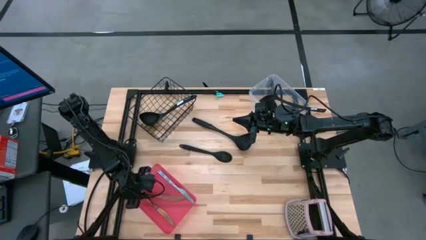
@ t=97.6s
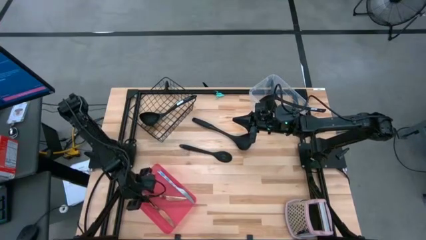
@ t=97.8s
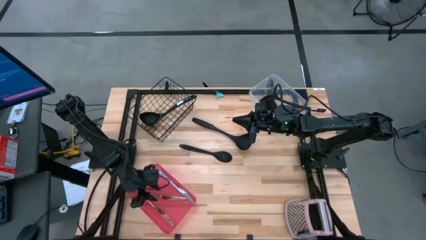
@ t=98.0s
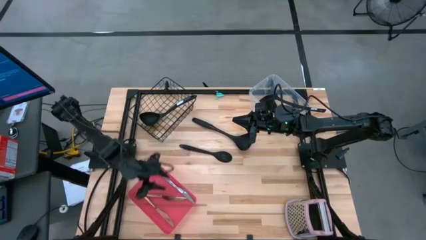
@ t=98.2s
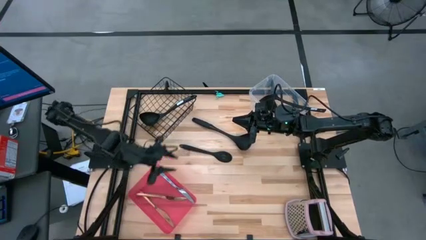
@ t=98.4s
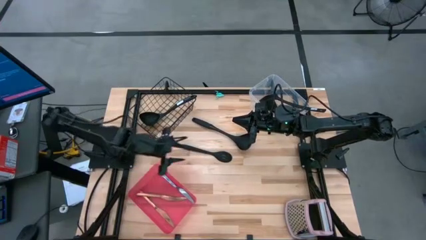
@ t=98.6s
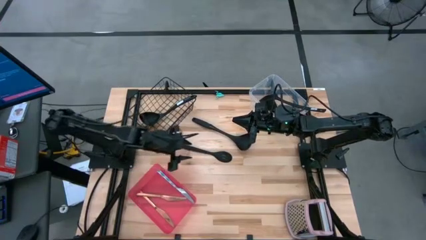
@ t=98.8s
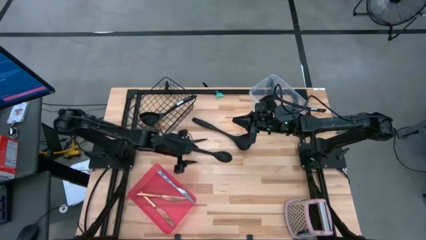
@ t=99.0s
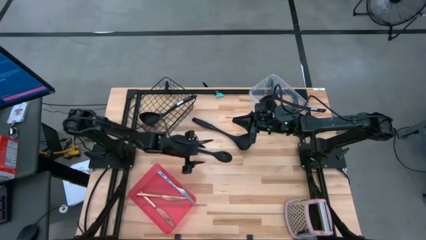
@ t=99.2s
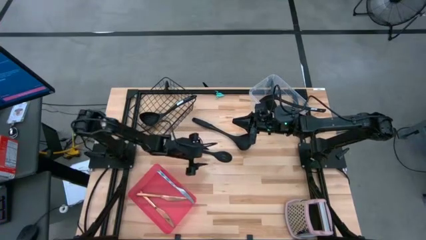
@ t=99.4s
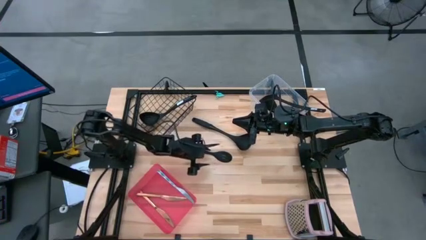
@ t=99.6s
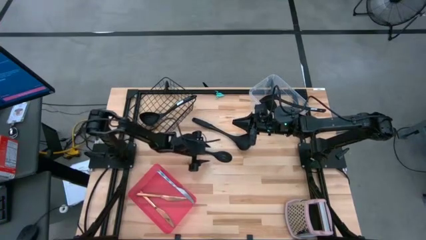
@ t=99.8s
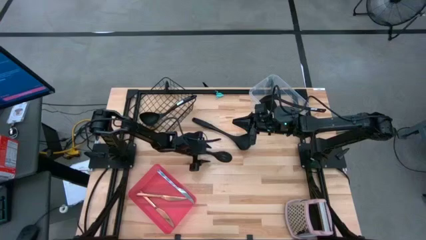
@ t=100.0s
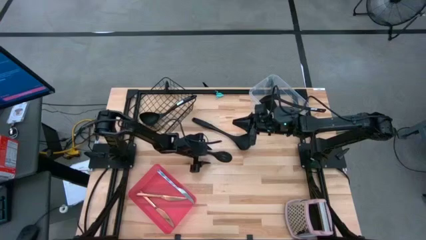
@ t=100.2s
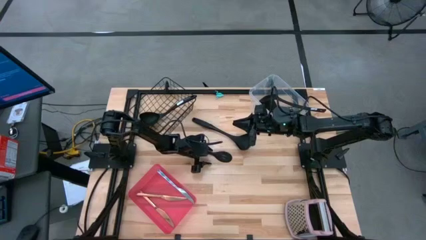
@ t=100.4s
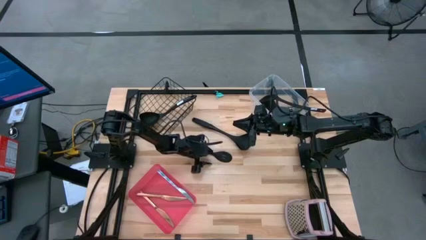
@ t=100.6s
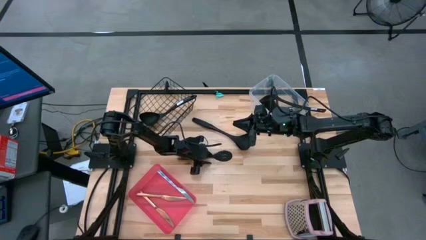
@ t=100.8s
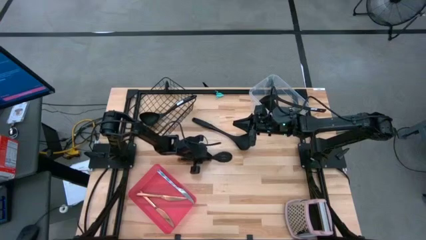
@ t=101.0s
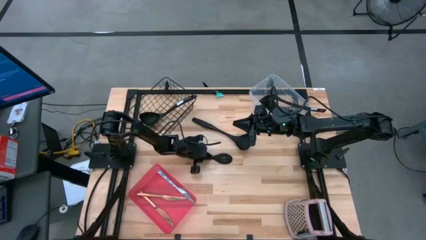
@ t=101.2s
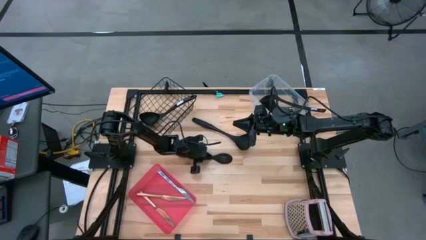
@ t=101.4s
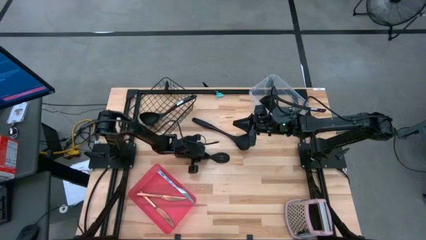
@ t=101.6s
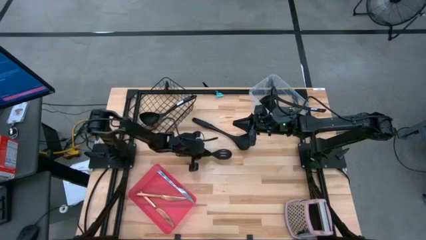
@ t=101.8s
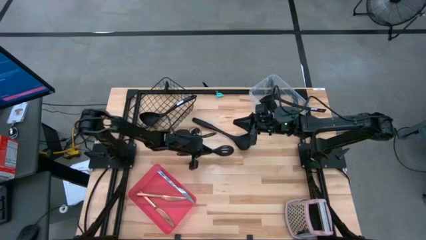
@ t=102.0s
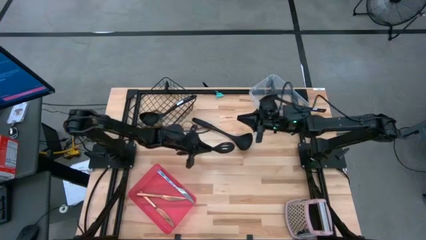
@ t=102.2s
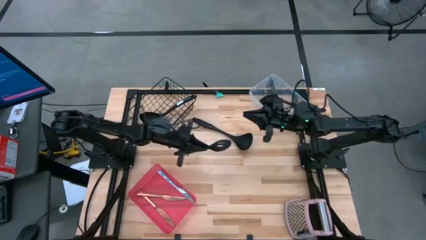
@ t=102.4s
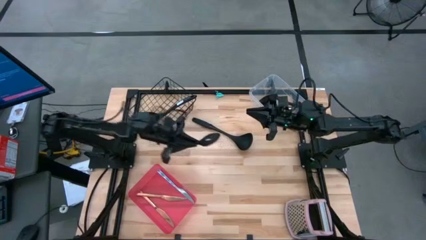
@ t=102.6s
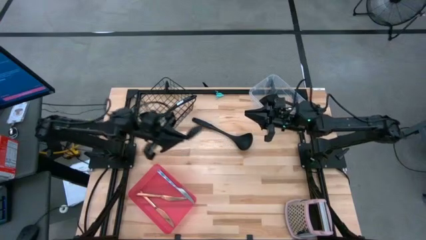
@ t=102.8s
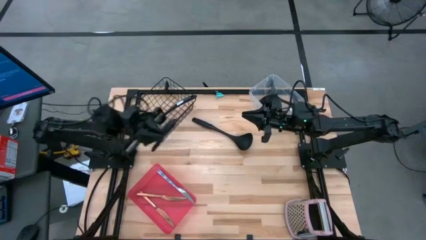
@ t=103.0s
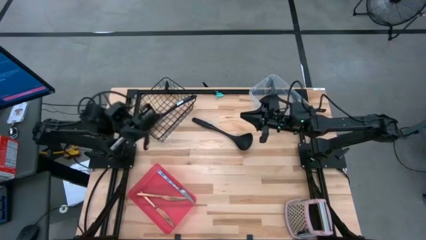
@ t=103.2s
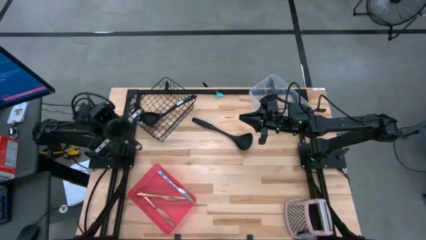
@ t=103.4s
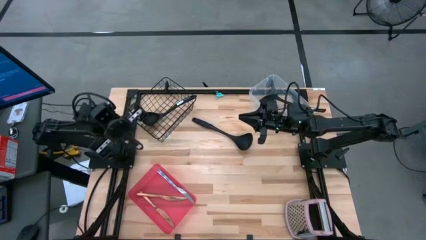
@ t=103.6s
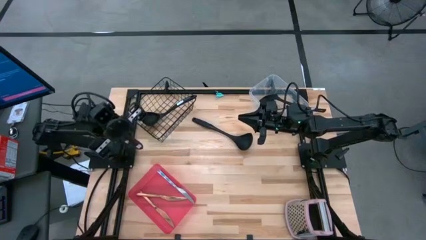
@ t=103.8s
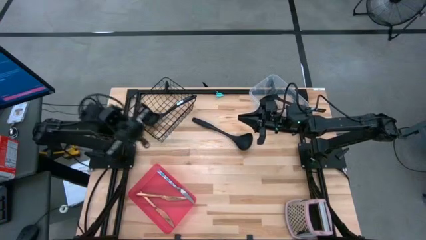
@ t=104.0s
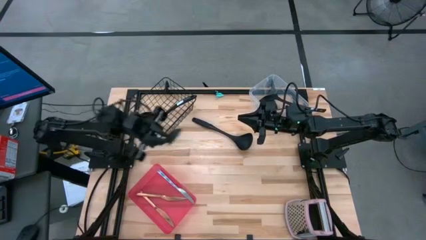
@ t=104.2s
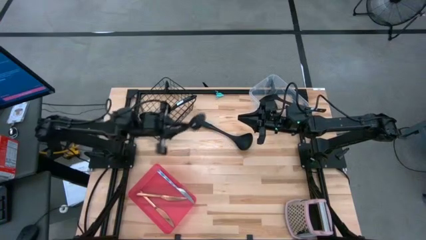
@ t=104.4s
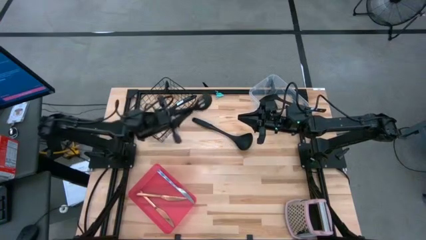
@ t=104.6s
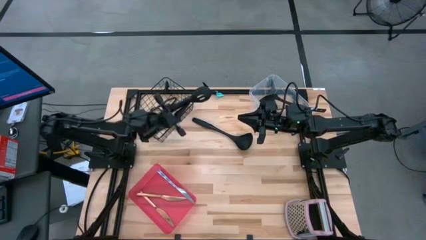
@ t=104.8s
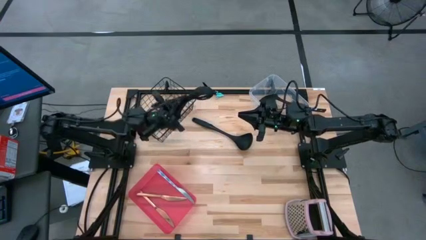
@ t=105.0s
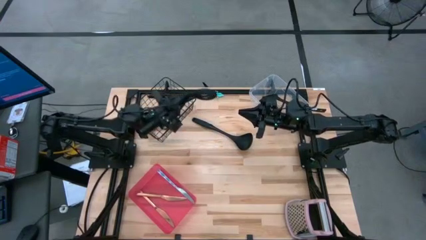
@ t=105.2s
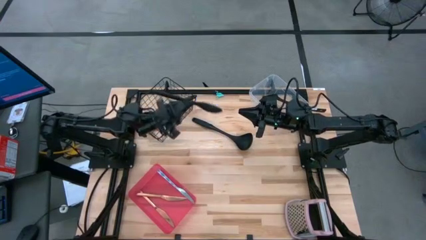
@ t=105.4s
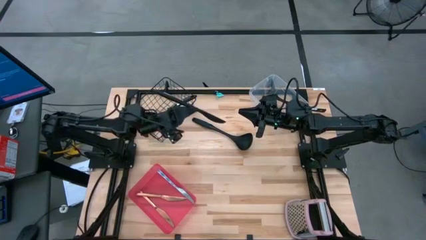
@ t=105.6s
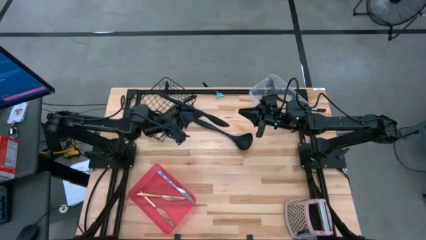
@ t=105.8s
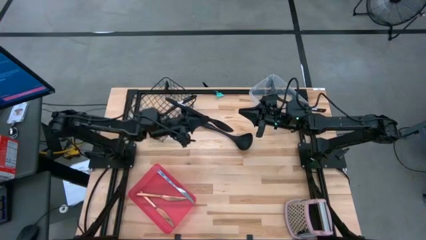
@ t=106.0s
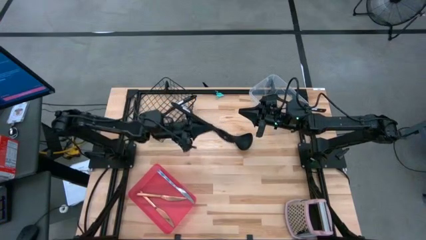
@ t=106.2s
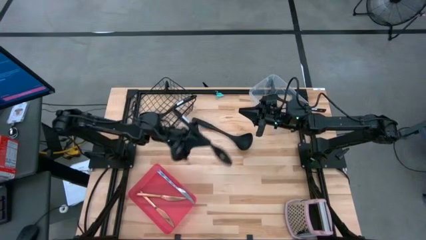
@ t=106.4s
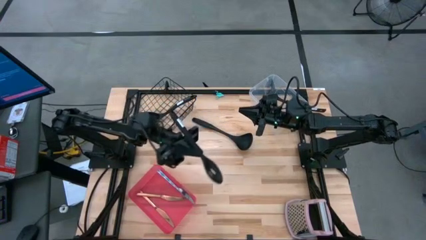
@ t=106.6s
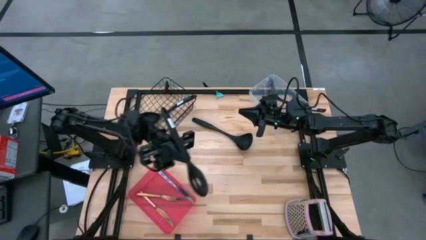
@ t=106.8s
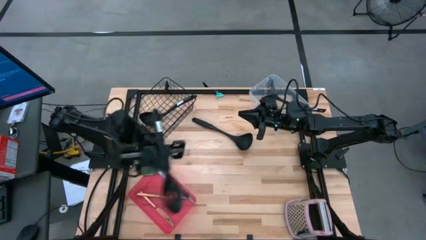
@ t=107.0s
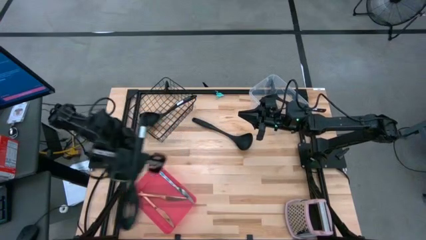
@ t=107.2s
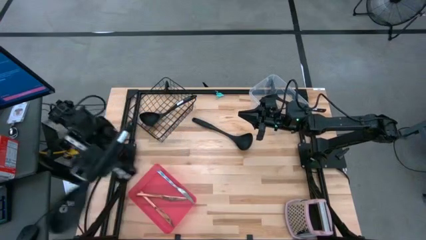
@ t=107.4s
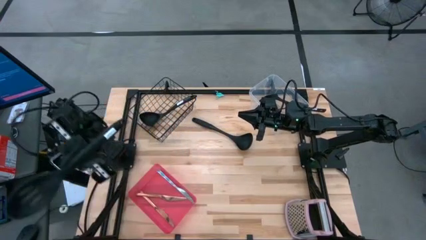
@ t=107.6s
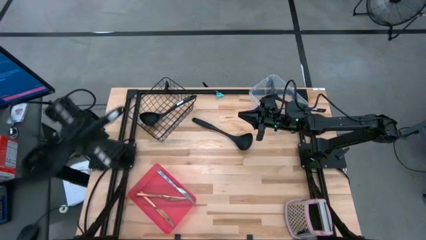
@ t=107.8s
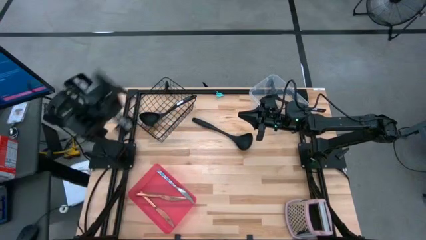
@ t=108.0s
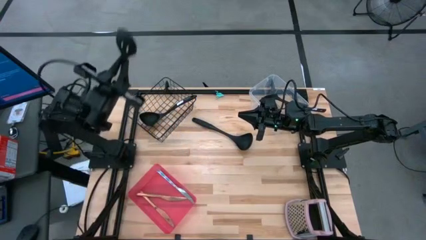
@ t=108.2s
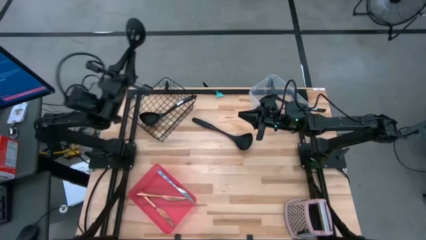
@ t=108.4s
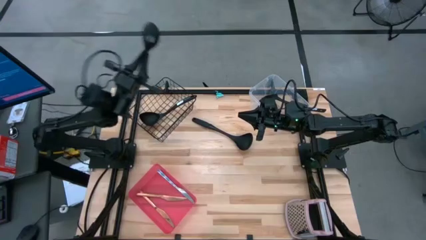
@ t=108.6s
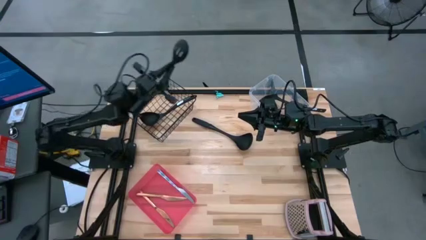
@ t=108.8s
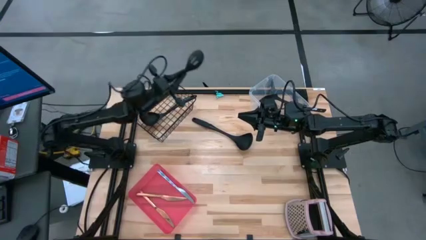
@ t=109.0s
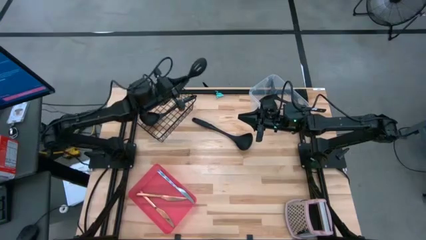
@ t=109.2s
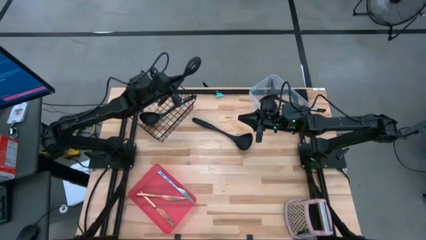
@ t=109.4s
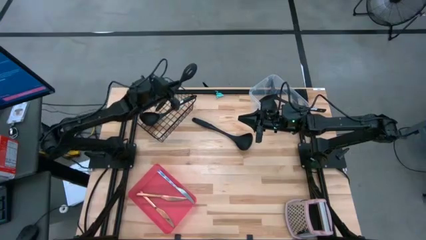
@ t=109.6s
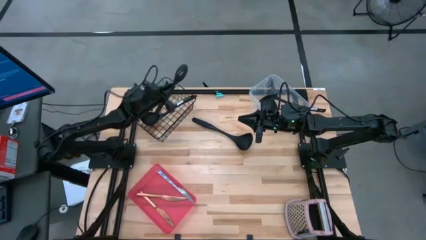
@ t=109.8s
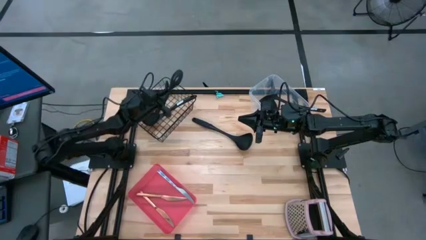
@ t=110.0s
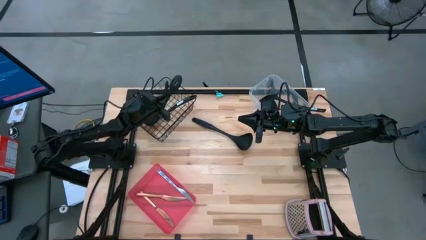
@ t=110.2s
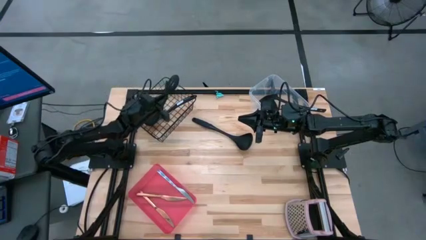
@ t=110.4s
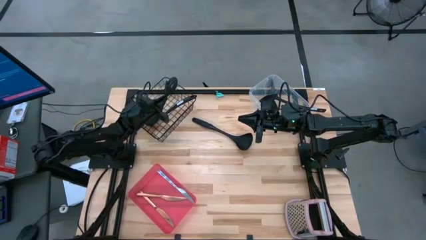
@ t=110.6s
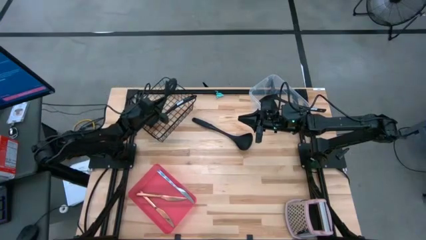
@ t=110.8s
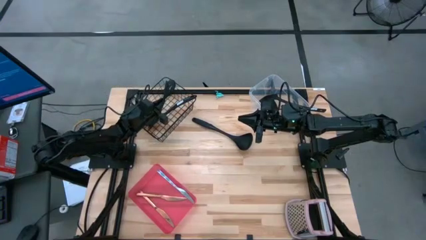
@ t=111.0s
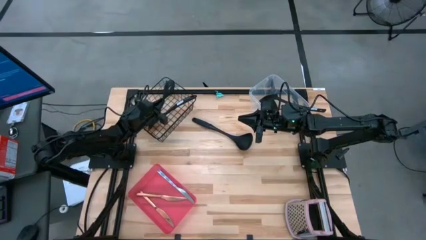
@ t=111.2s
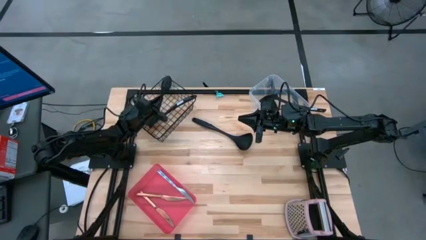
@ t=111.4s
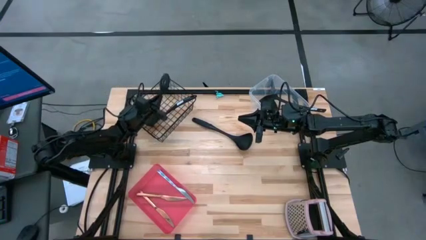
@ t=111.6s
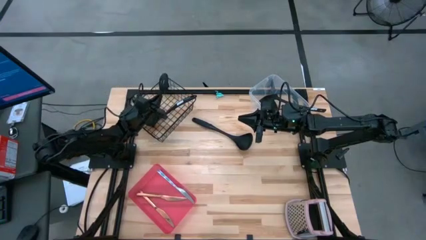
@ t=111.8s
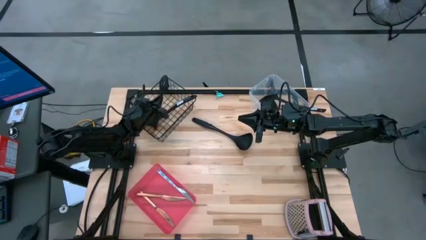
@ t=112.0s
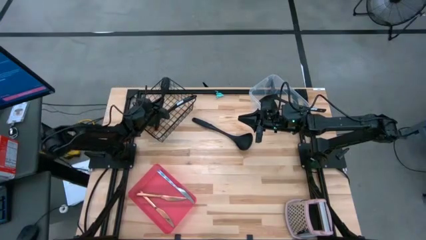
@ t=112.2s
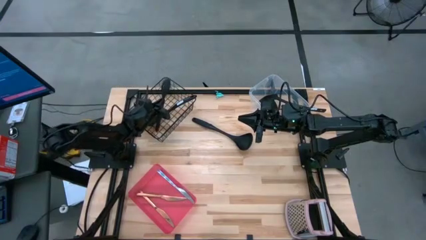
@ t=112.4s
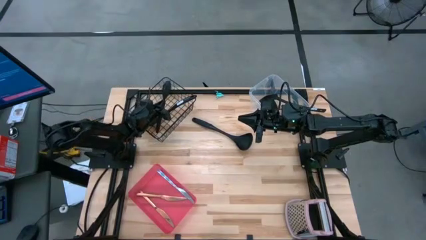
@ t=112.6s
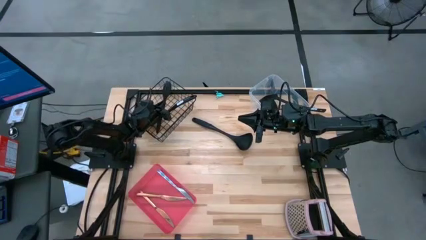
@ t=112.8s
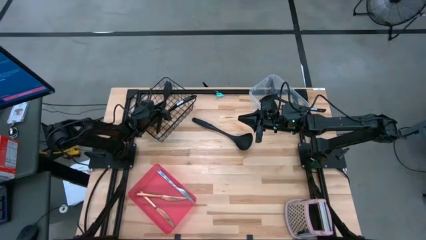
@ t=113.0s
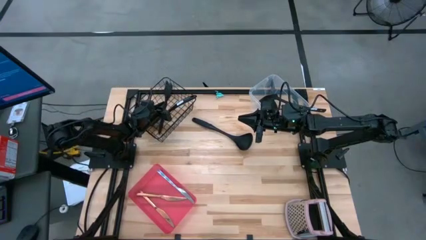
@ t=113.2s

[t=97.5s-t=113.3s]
Task: Pick & Place Kitchen Items
Put the black slotted serving spoon into the wire basket

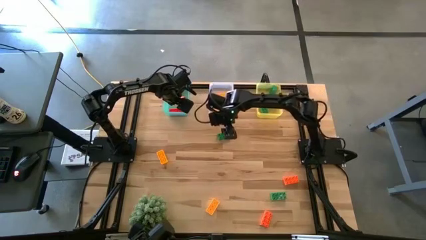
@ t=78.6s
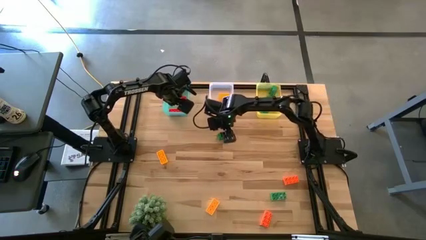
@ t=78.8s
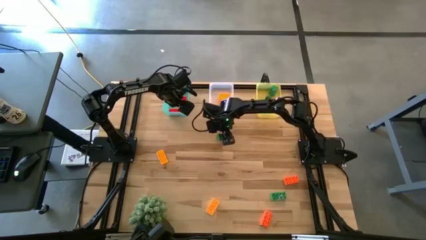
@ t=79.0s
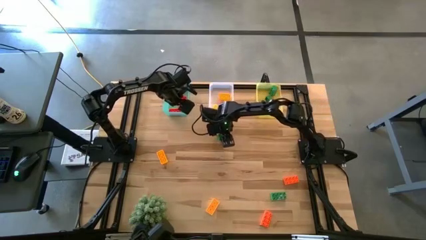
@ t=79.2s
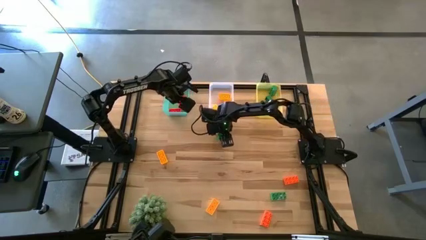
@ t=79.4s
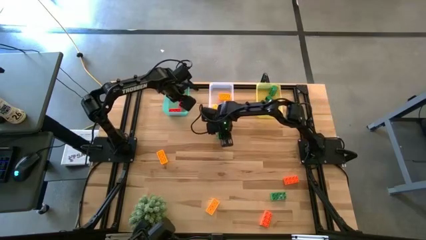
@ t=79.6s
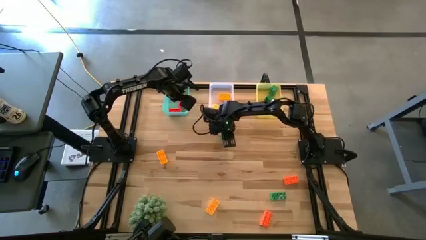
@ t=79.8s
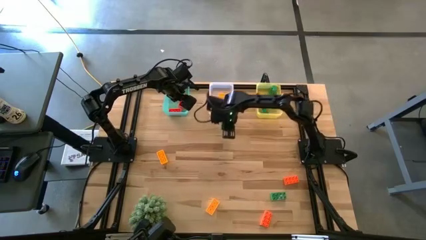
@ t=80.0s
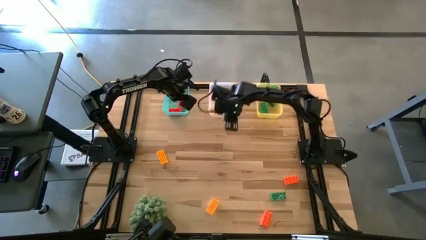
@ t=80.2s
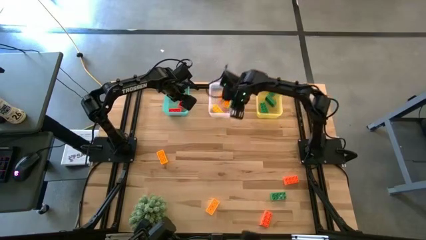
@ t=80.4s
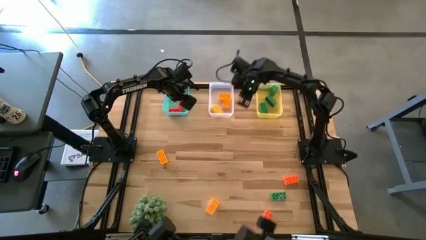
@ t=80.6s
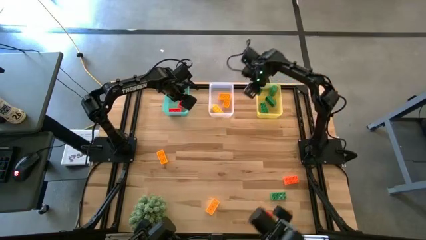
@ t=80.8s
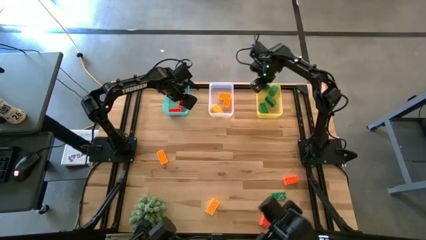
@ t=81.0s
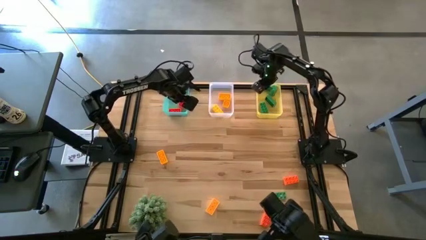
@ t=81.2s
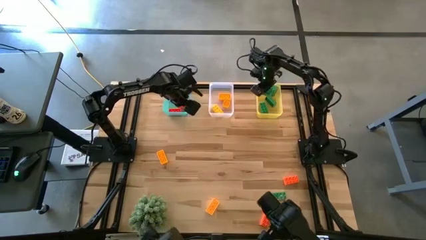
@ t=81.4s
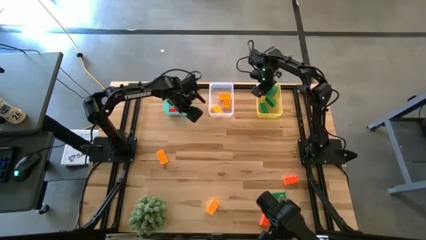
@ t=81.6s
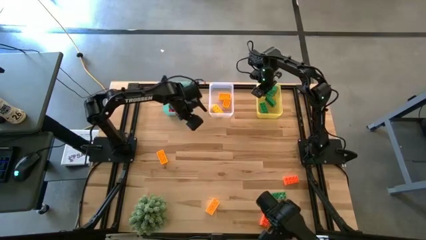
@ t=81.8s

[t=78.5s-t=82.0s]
Task: Sort & place blocks by color
Put the green game piece into the yellow bin
